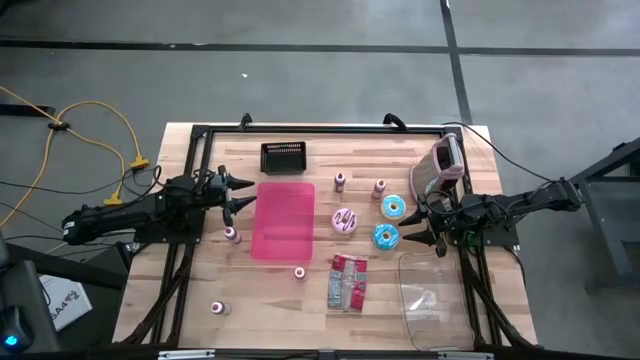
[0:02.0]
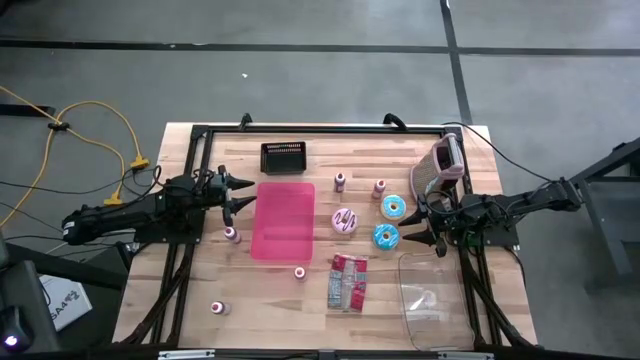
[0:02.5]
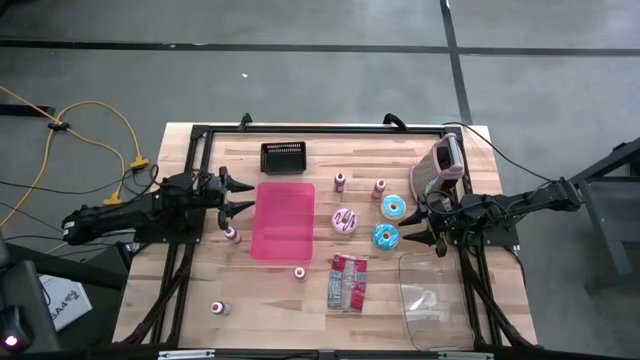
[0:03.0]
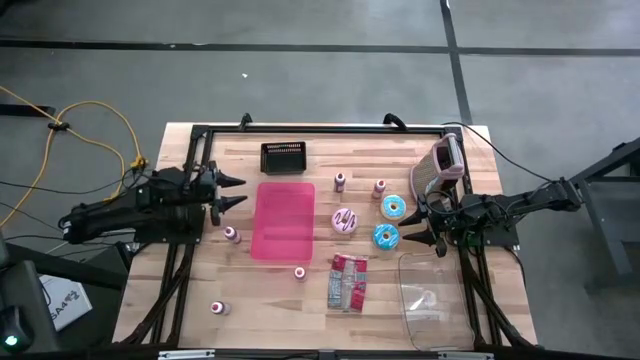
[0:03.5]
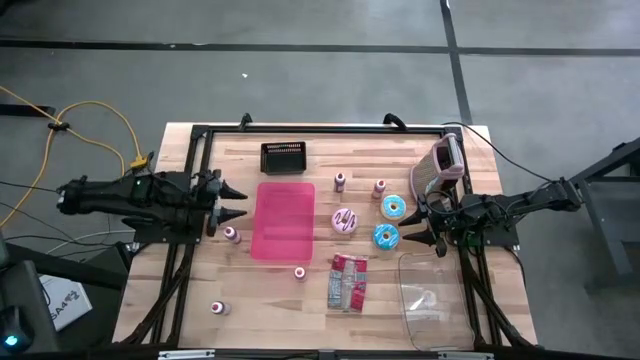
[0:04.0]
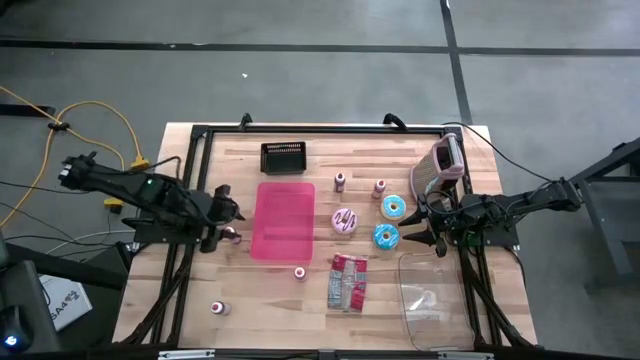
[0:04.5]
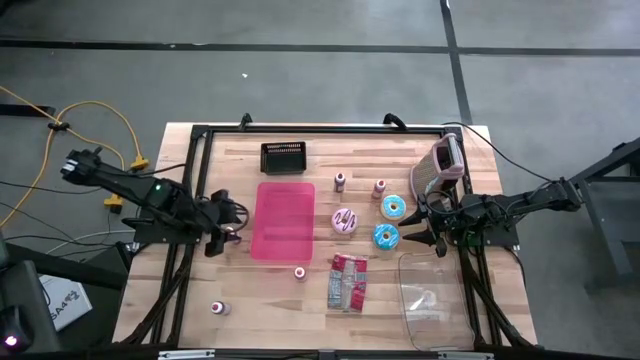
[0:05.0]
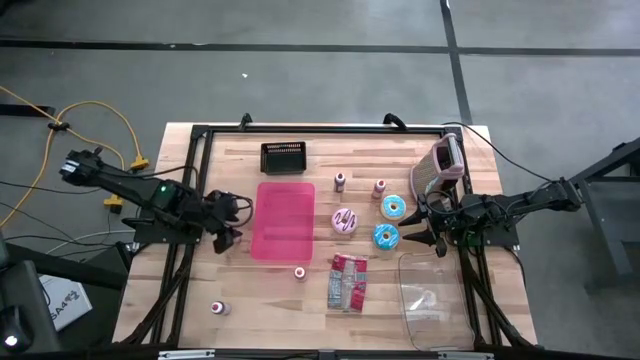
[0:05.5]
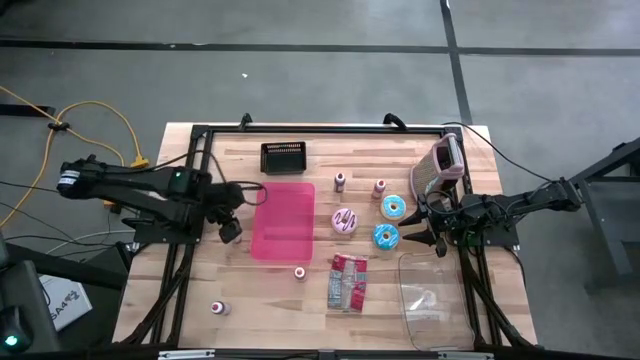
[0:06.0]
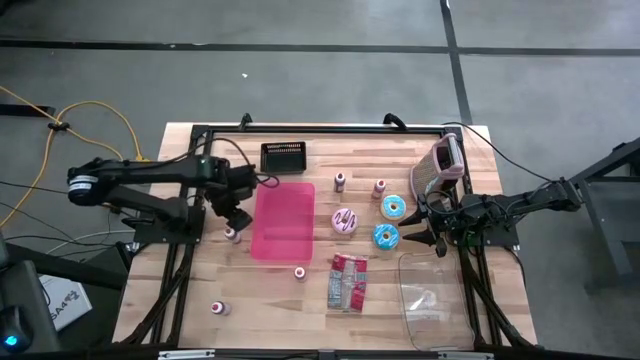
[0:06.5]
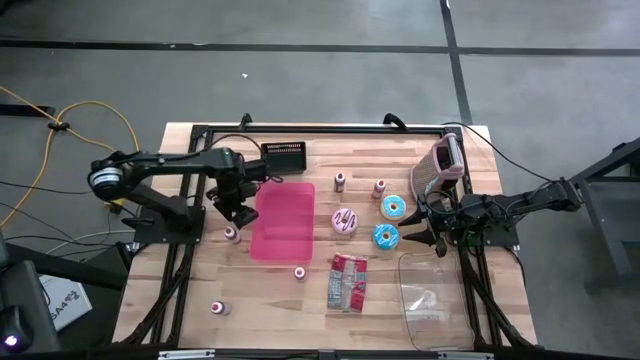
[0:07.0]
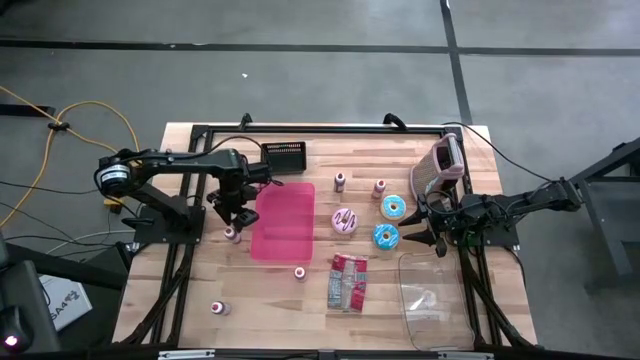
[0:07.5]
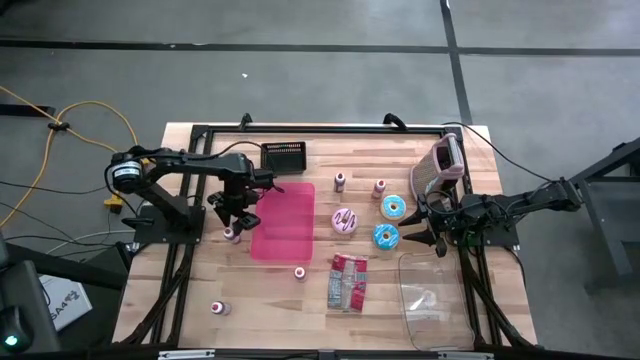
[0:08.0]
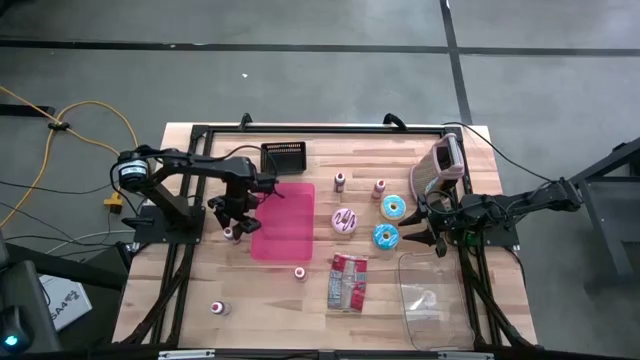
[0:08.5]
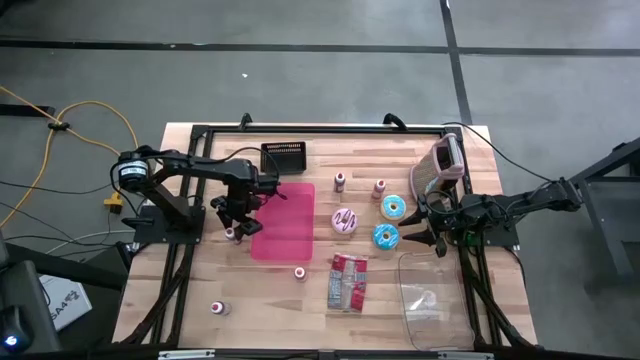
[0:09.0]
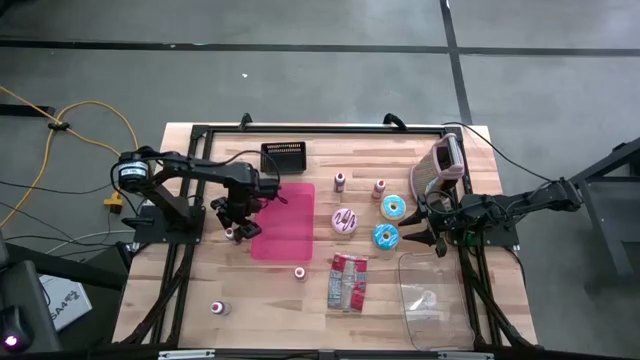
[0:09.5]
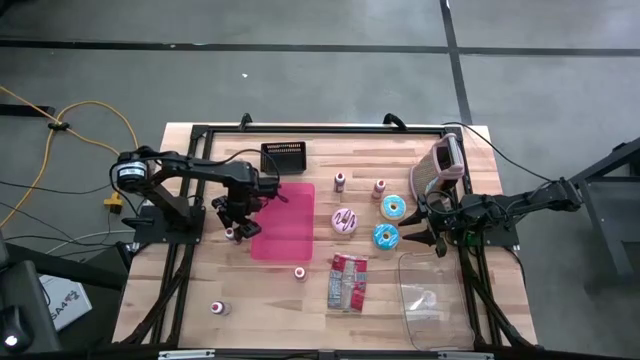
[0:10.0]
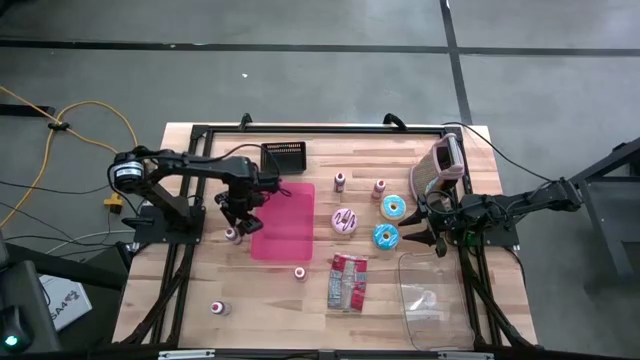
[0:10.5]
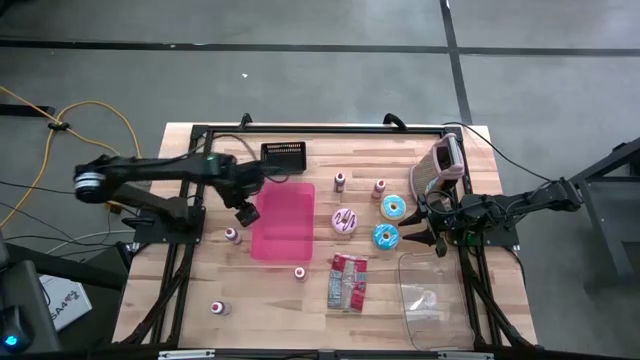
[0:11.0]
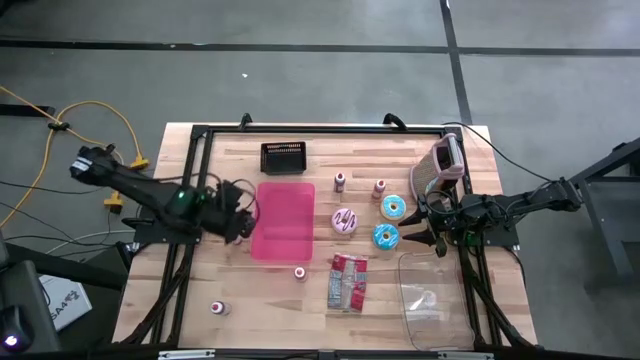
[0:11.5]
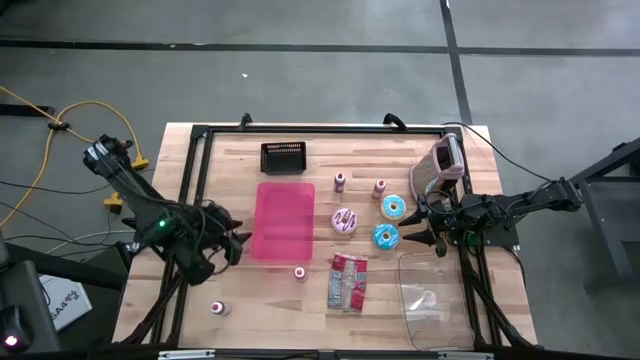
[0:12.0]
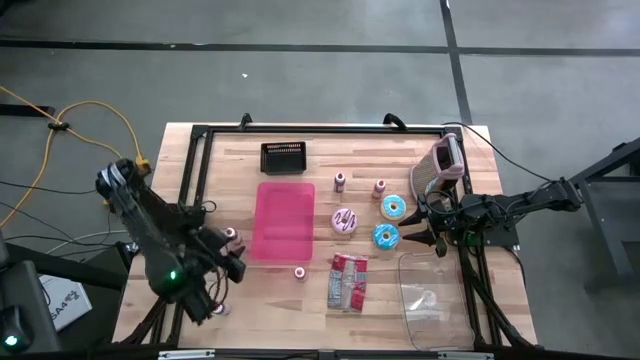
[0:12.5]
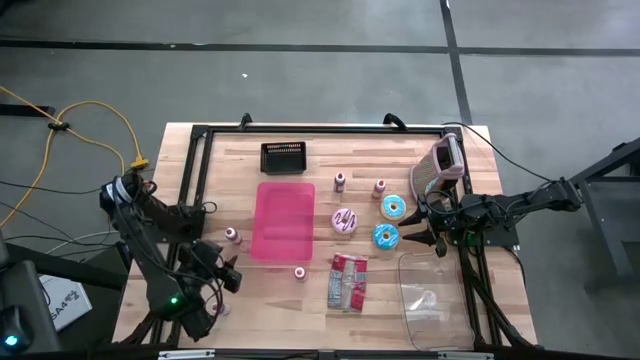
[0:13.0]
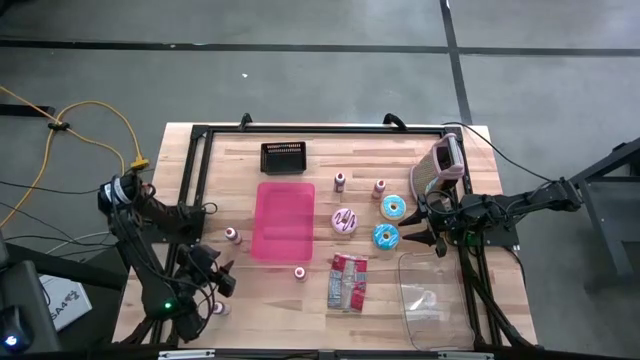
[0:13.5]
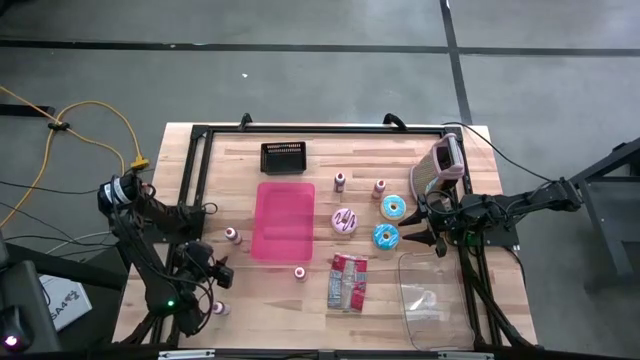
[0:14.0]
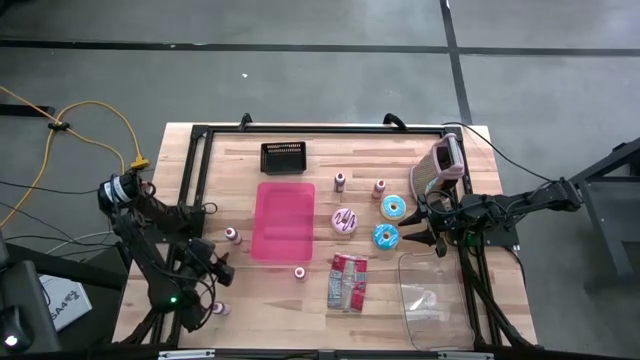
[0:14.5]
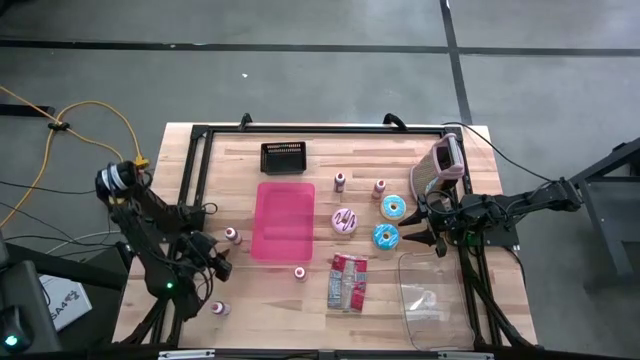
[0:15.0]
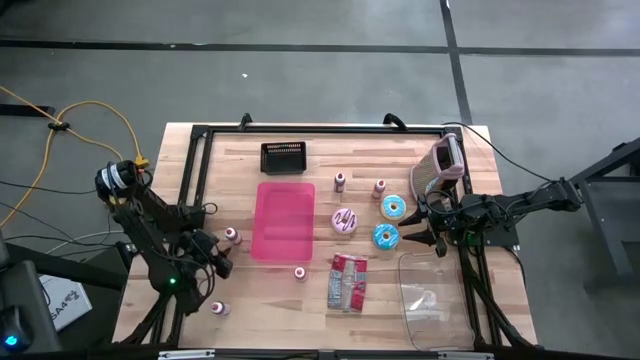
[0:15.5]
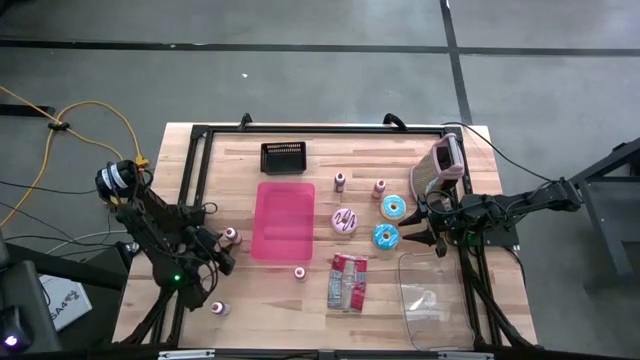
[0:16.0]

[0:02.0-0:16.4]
Put the middle red food coloring bottle into the transparent bin

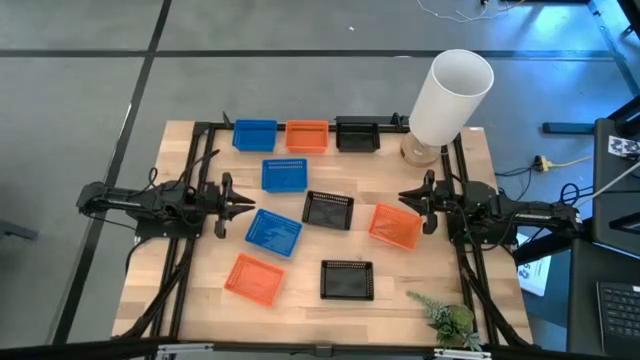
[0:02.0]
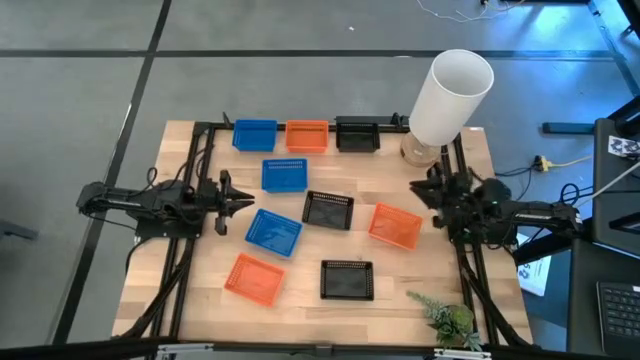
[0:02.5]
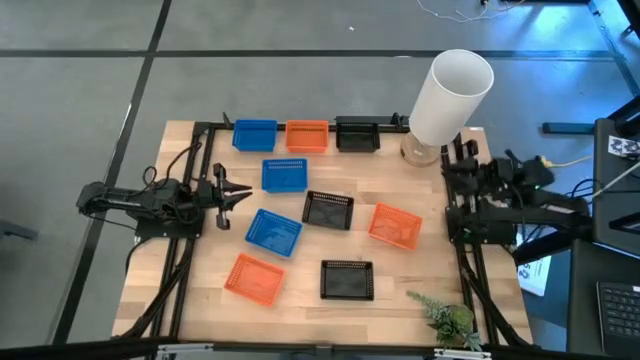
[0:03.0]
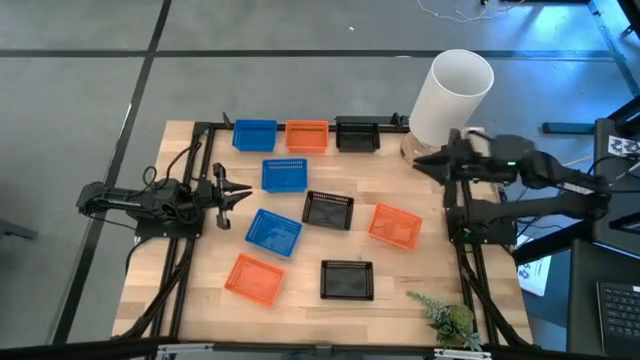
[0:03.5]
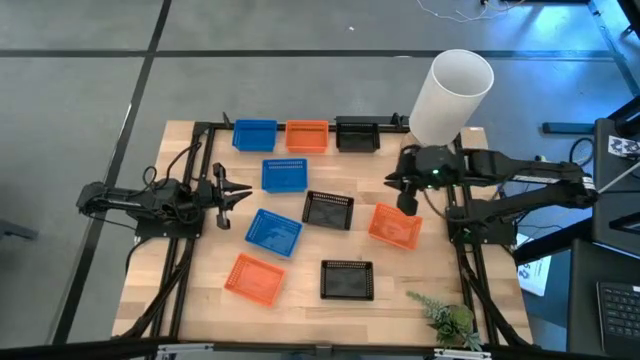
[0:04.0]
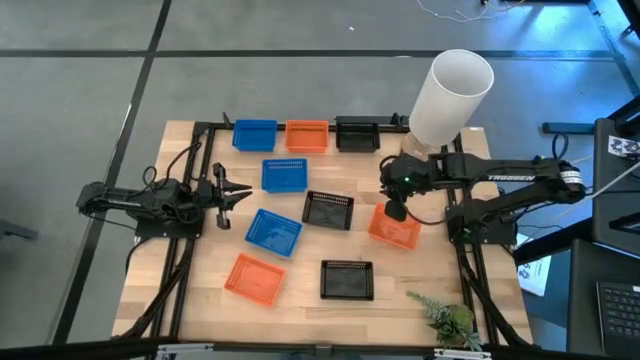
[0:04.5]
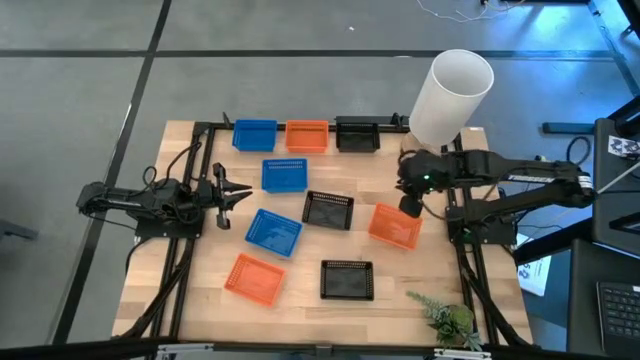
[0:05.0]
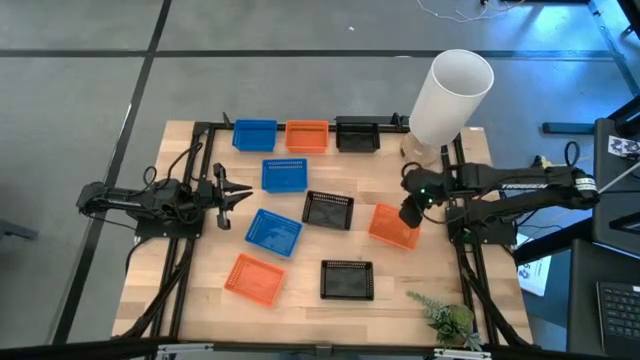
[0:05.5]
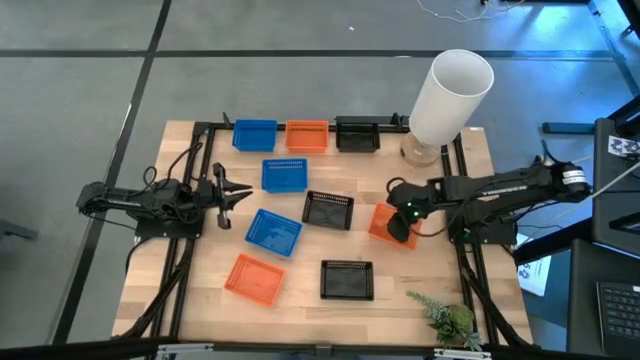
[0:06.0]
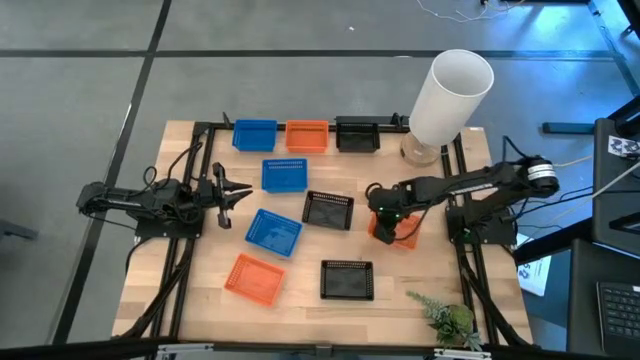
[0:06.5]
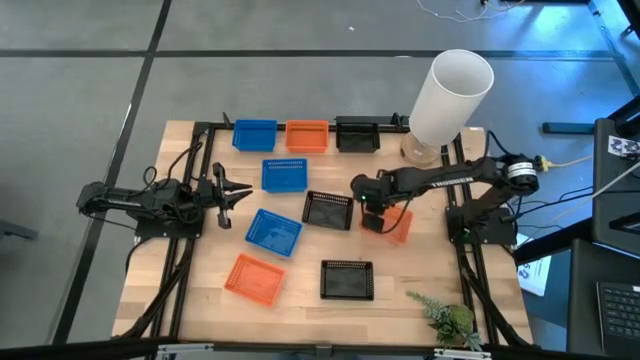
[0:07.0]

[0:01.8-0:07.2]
Adjust the middle orange bin
